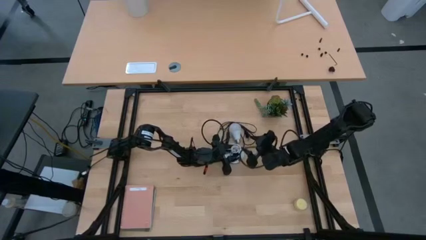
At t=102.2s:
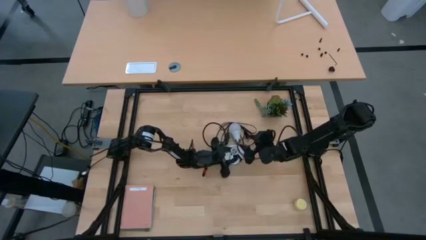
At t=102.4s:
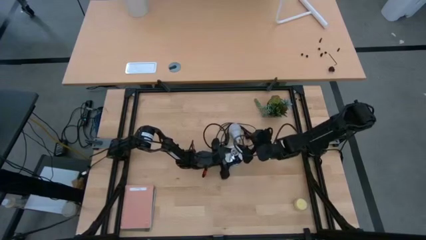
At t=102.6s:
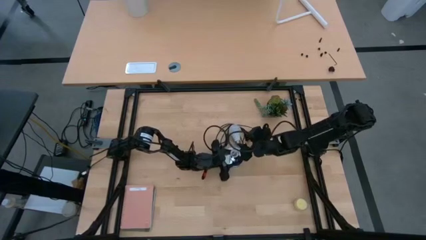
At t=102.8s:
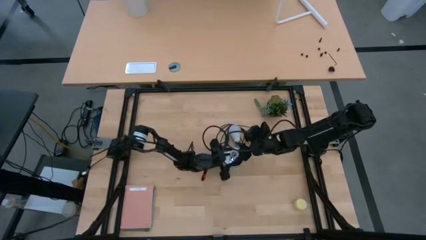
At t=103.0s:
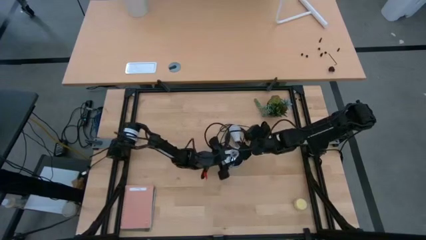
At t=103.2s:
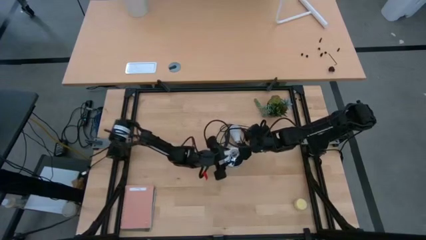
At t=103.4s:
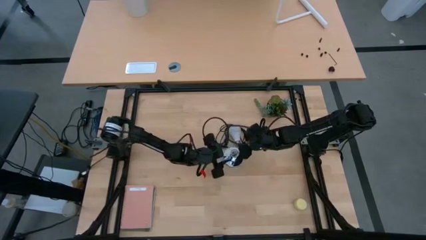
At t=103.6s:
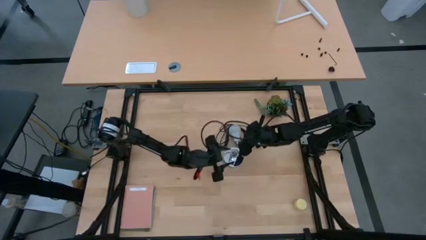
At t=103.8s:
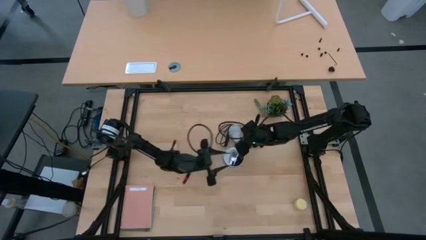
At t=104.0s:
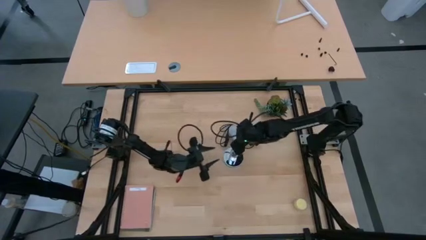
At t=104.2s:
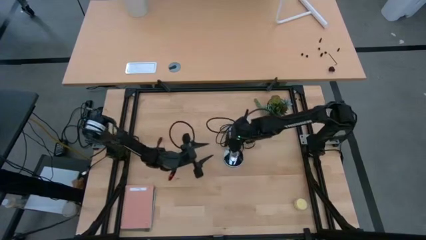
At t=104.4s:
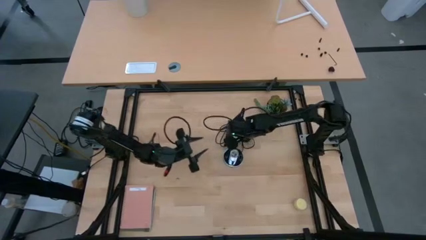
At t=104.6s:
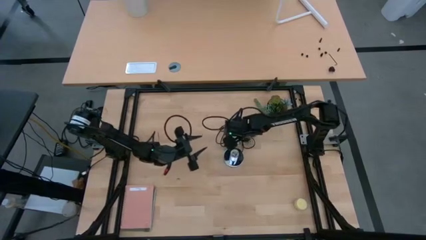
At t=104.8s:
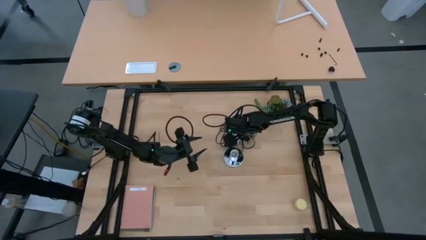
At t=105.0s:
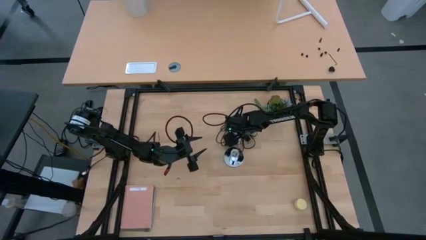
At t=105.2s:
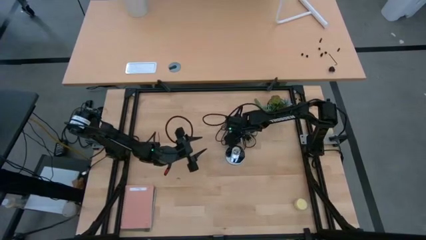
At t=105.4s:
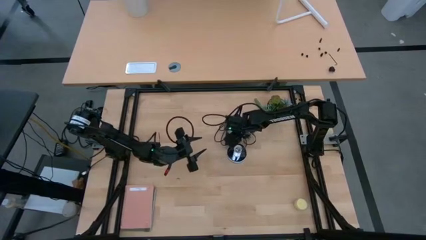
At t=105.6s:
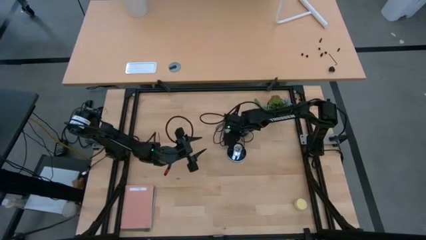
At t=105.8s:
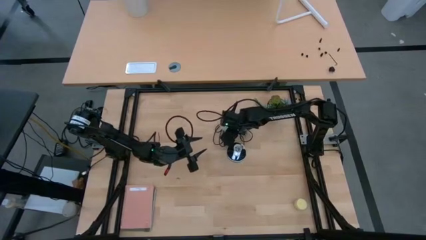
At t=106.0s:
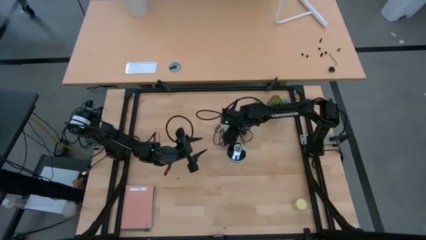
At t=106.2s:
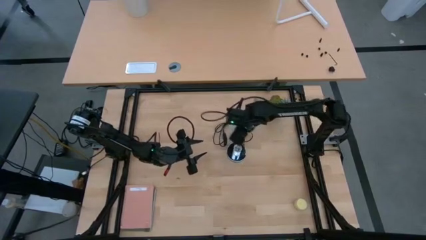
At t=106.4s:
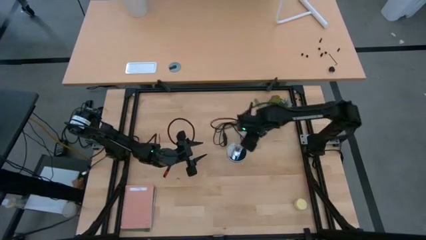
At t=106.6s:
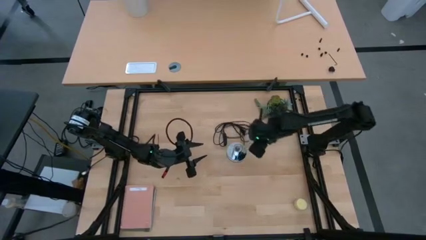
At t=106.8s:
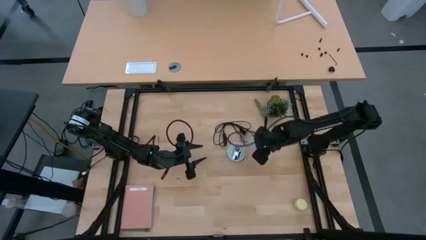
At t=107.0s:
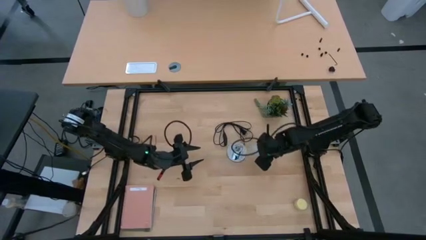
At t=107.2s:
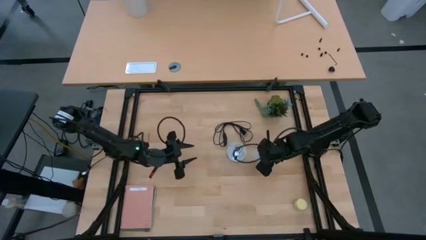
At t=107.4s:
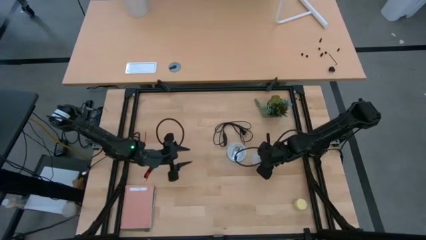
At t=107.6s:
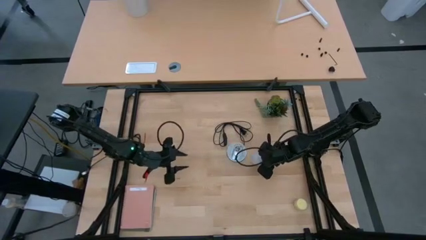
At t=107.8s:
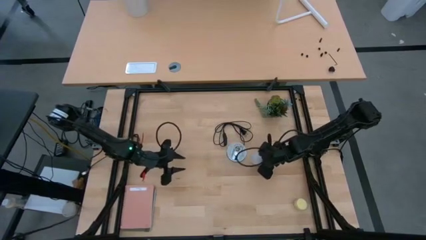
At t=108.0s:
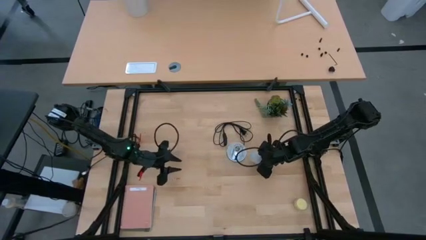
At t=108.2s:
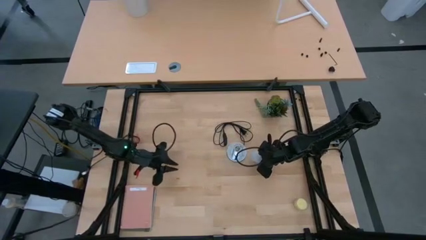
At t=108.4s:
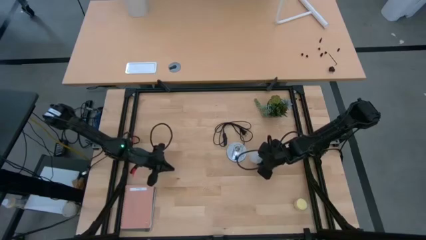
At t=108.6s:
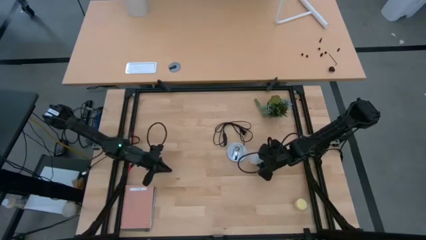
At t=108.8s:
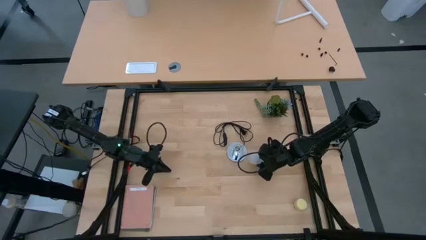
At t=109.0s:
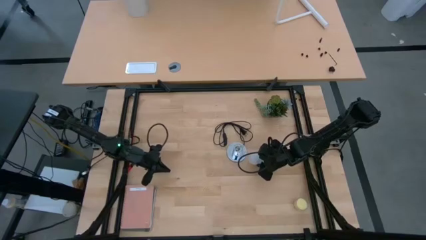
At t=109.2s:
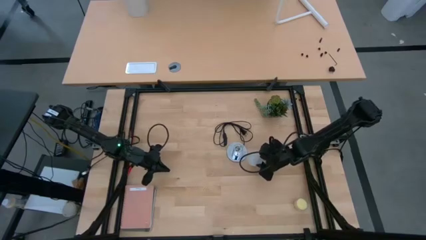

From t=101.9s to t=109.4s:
Task: Screw lightbulb
Move the lightbulb

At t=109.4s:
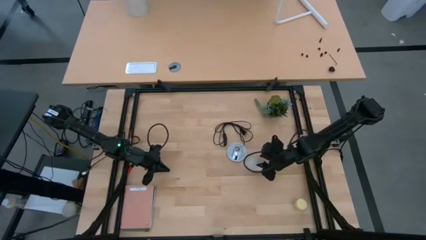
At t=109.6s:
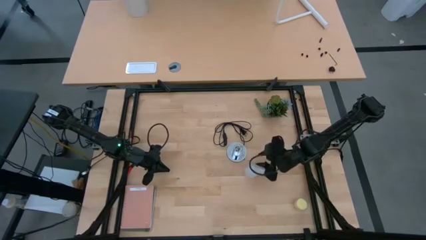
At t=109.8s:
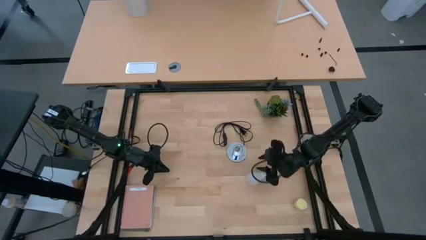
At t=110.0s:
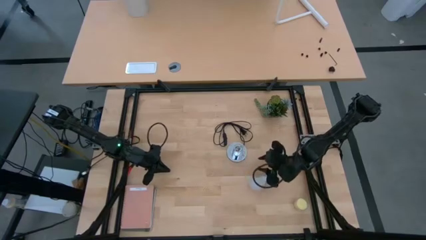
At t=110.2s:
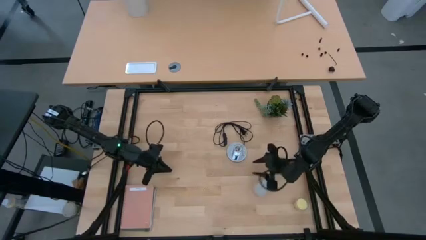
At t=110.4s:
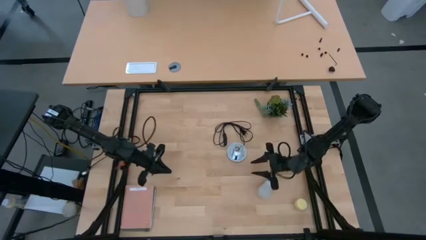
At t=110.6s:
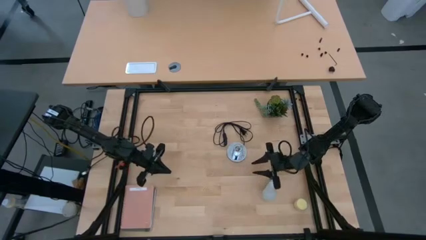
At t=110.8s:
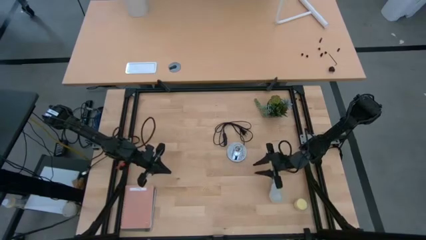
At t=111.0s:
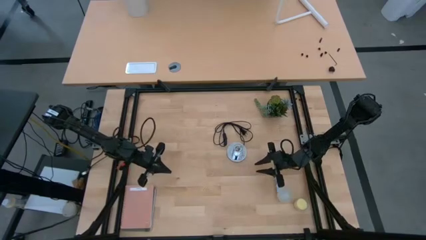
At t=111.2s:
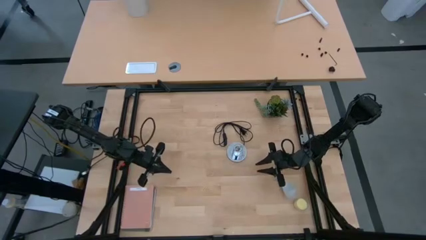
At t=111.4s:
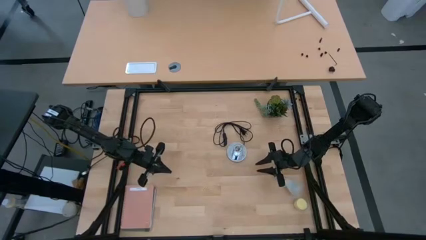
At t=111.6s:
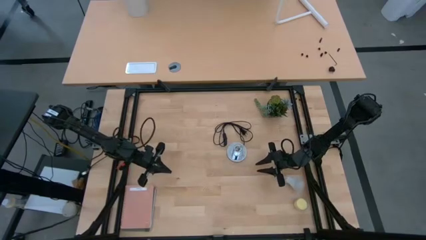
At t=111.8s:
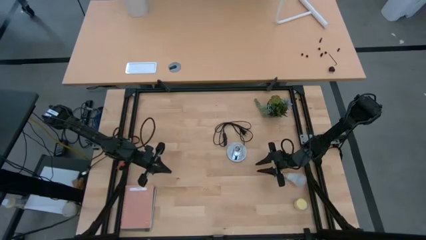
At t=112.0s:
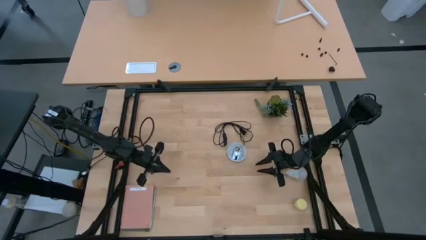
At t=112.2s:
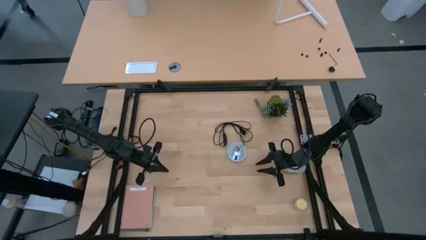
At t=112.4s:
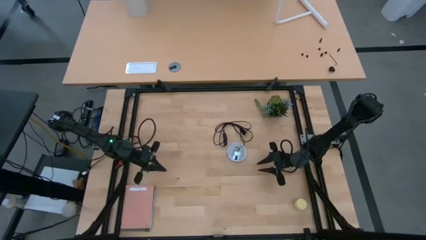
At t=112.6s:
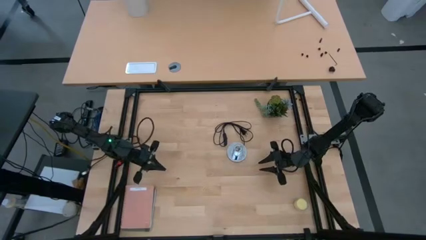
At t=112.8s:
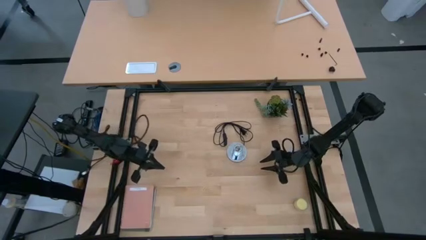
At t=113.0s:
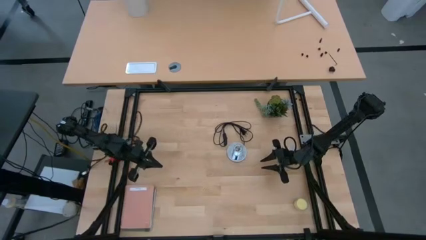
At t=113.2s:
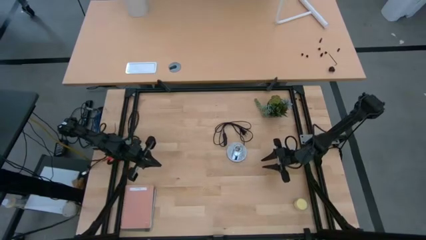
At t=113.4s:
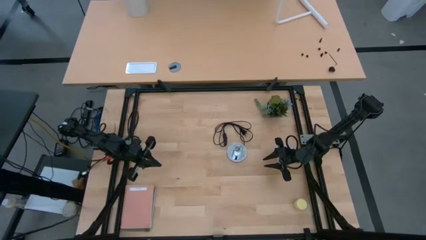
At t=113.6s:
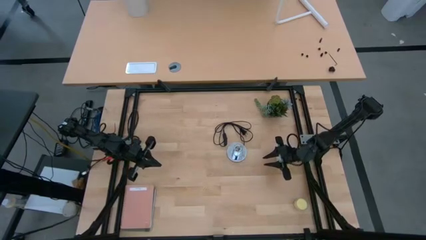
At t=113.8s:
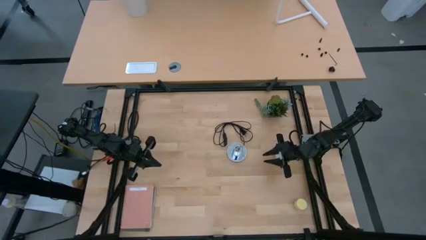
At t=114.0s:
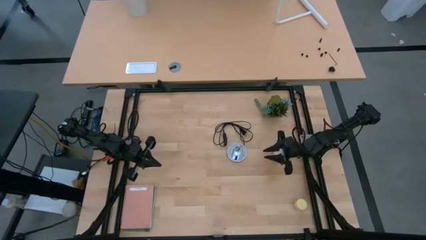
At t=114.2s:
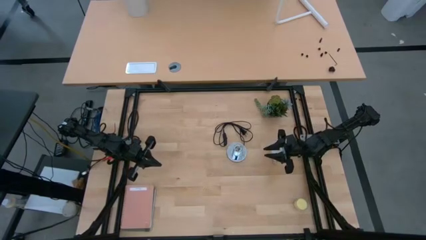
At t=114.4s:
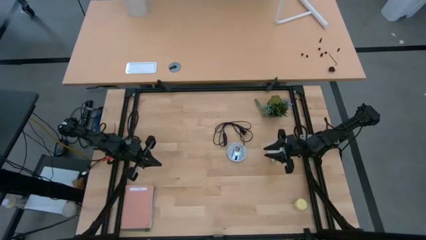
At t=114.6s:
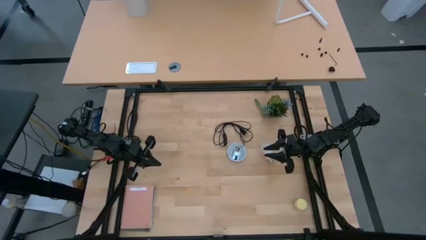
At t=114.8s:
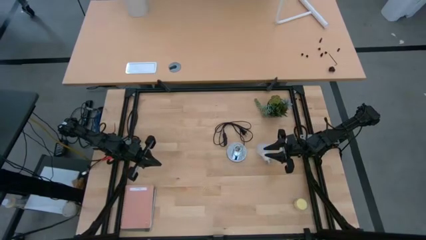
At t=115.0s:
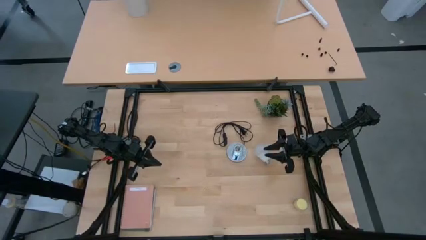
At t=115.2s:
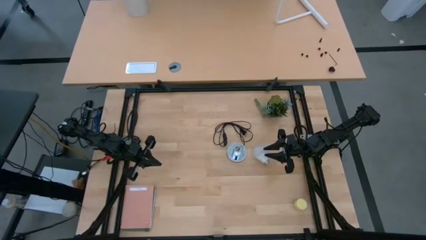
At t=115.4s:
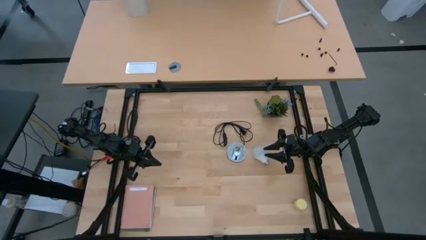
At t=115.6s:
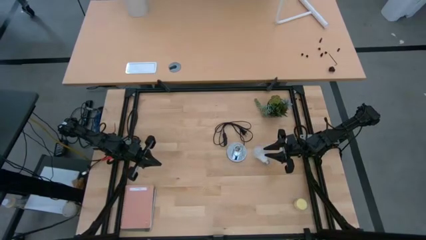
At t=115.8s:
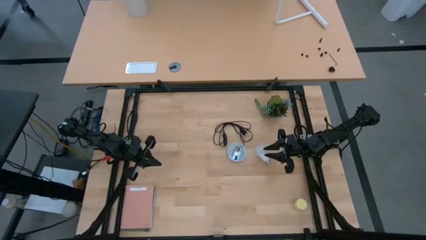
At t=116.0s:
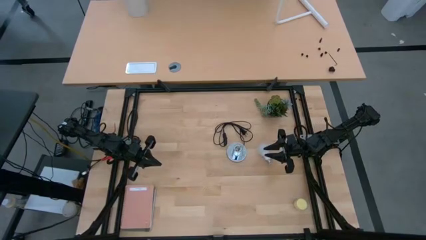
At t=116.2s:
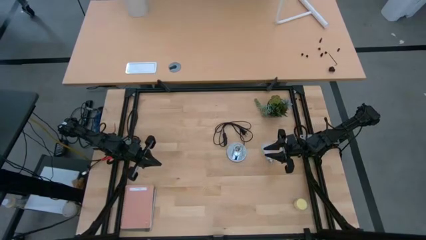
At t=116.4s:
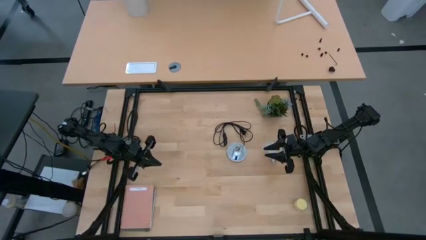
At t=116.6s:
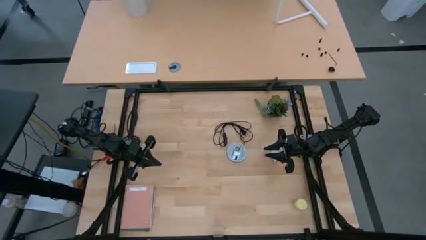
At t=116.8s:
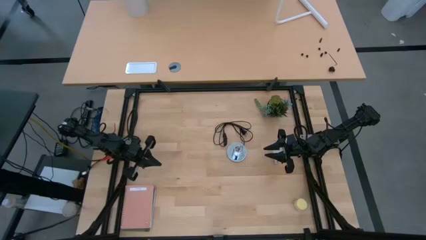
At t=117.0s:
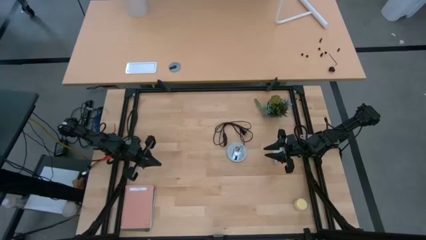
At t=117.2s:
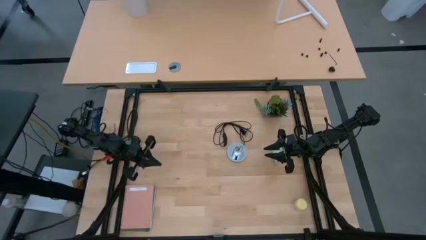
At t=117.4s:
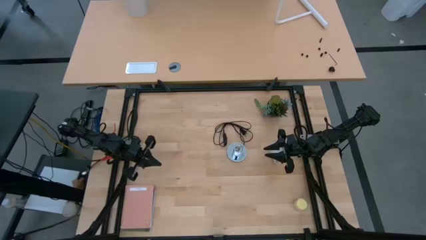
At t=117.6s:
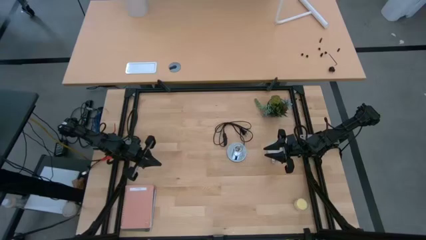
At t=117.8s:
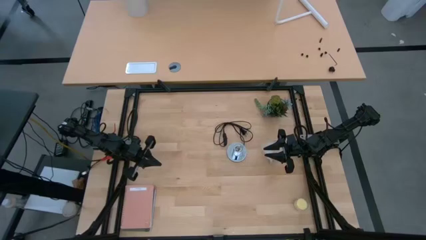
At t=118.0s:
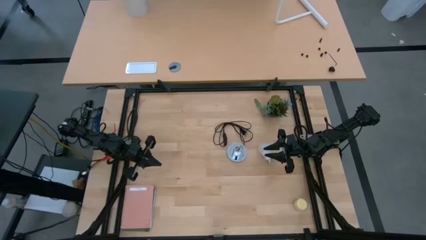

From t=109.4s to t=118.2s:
Return to Home Position
